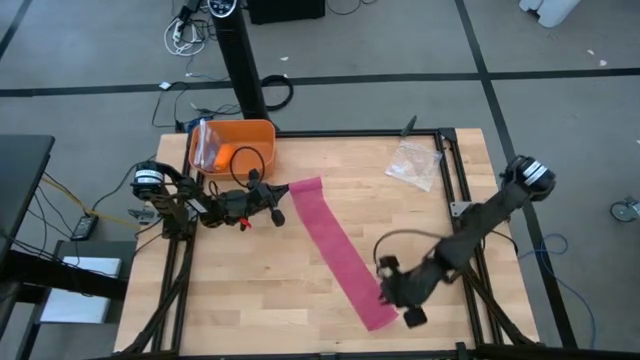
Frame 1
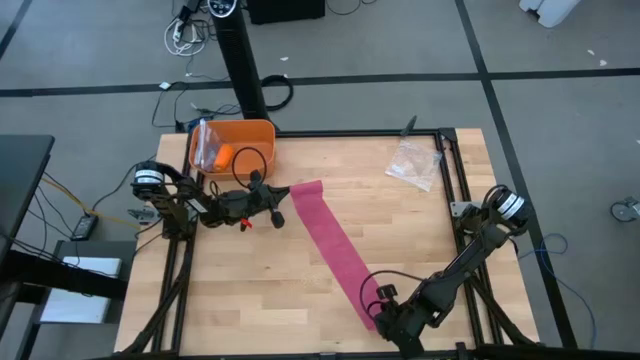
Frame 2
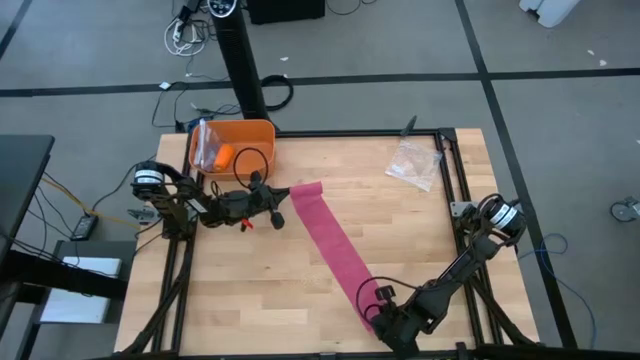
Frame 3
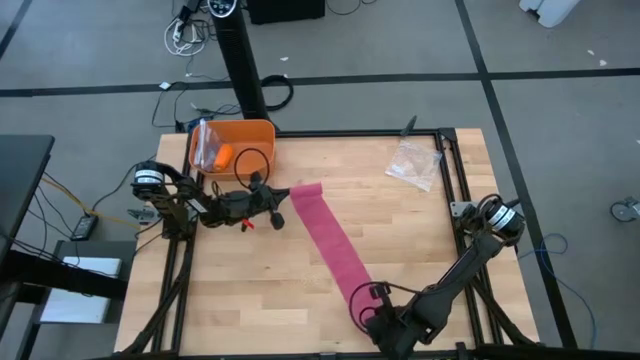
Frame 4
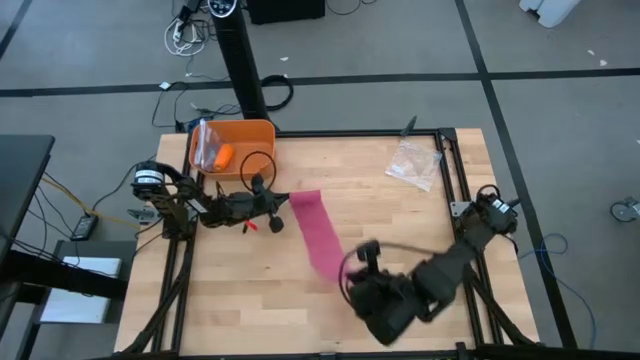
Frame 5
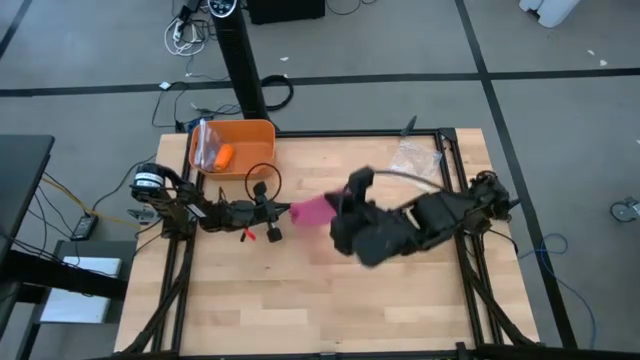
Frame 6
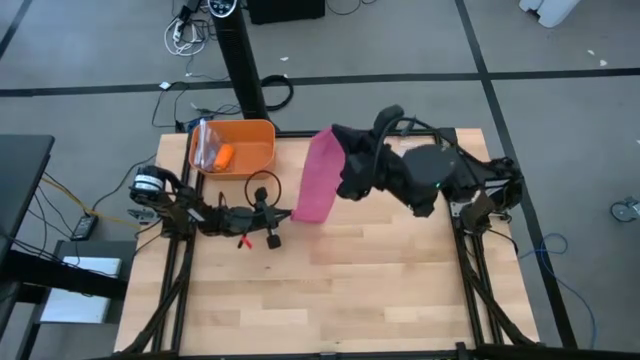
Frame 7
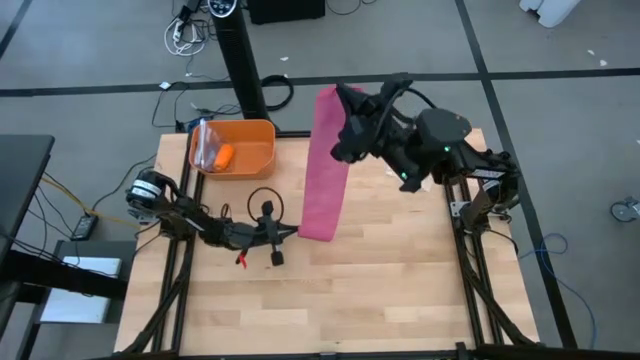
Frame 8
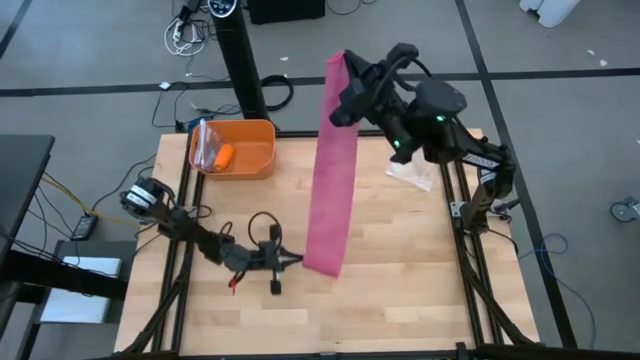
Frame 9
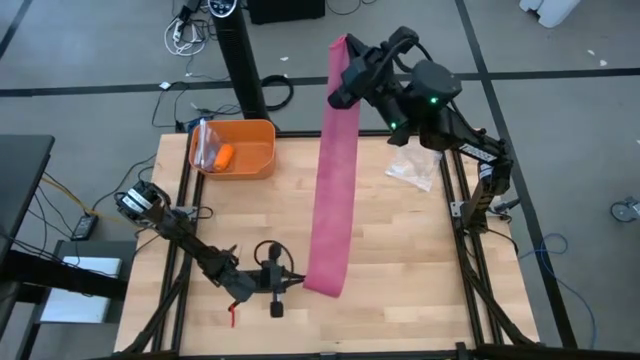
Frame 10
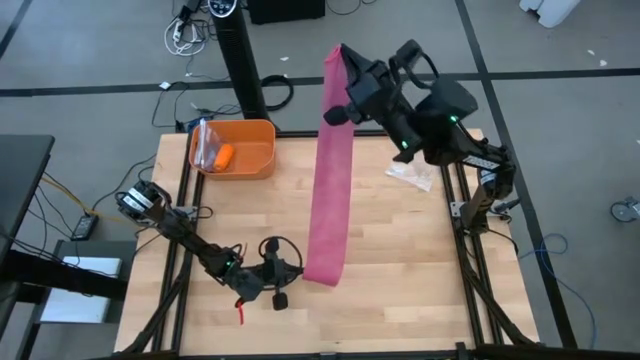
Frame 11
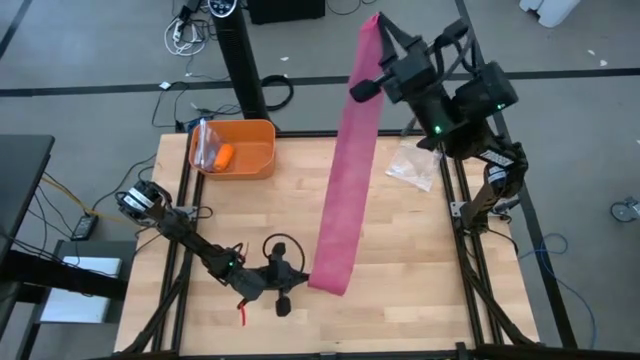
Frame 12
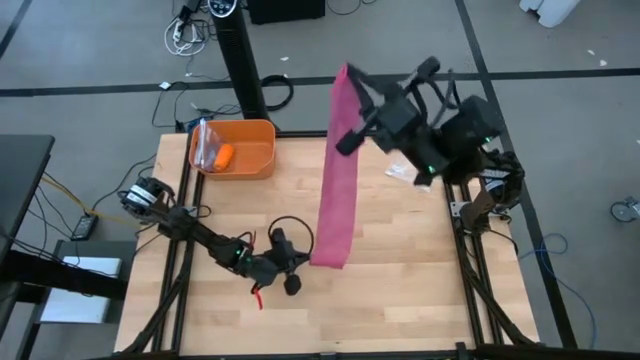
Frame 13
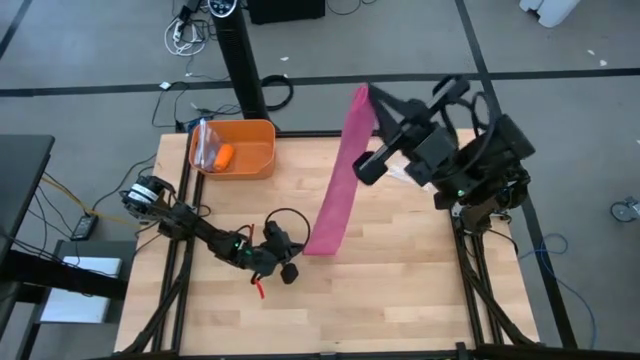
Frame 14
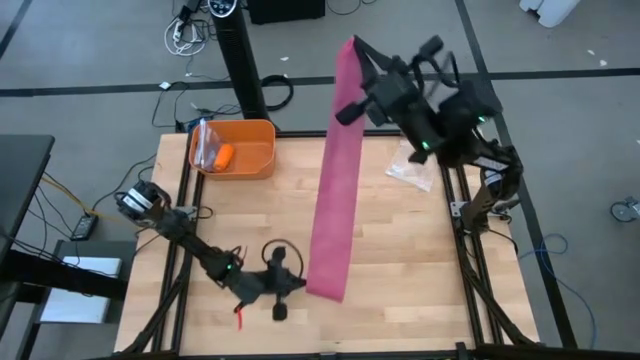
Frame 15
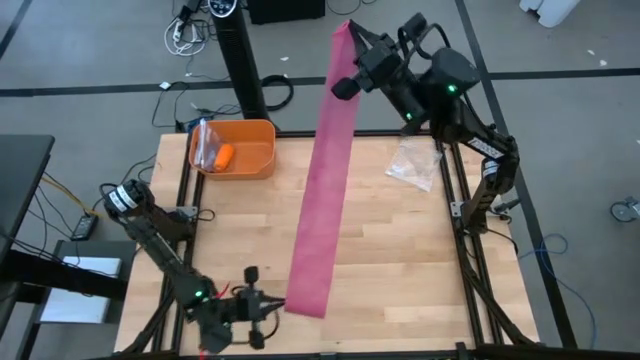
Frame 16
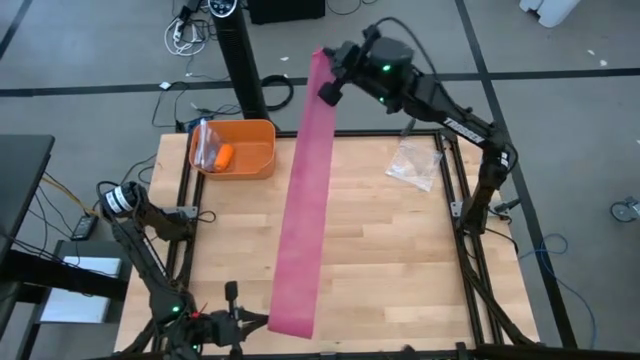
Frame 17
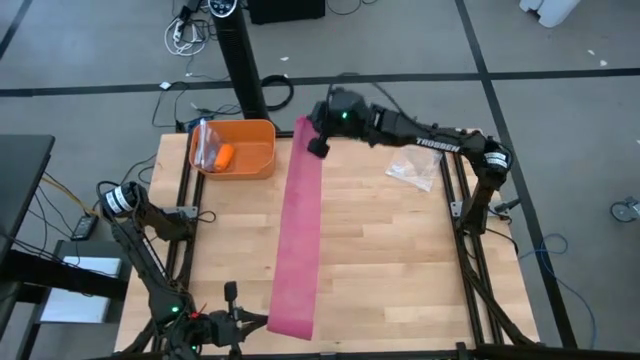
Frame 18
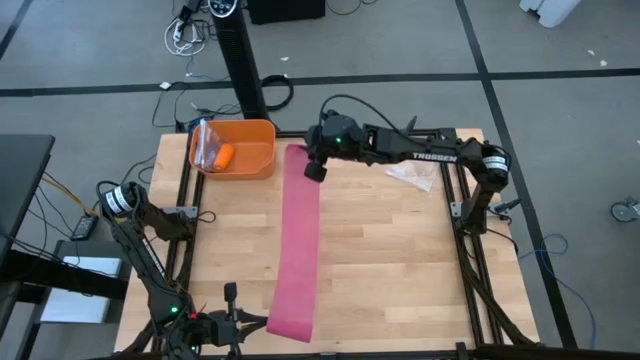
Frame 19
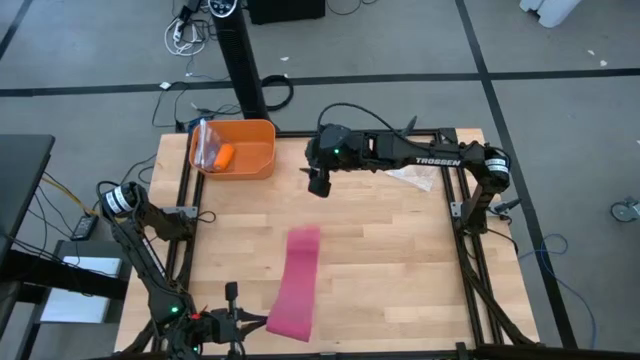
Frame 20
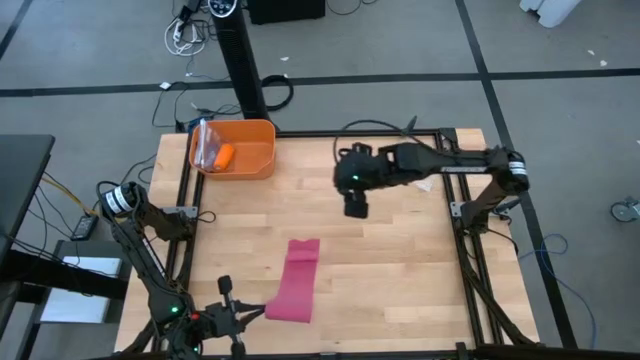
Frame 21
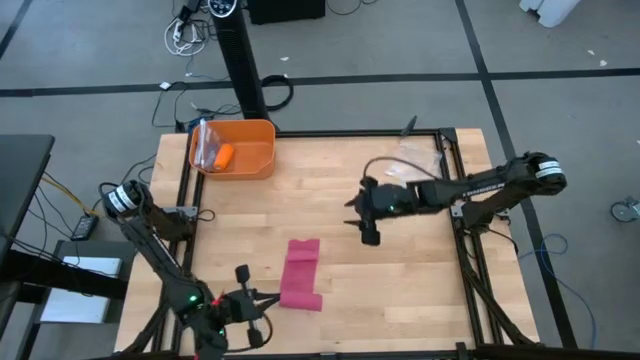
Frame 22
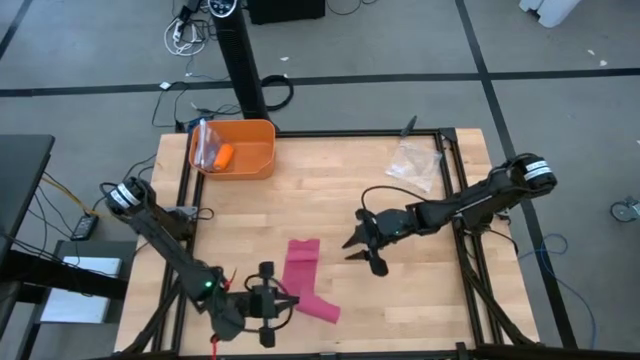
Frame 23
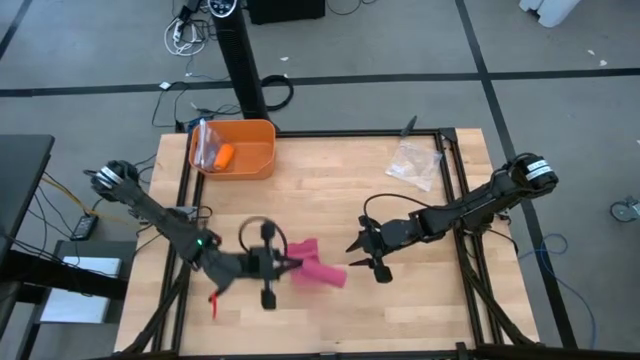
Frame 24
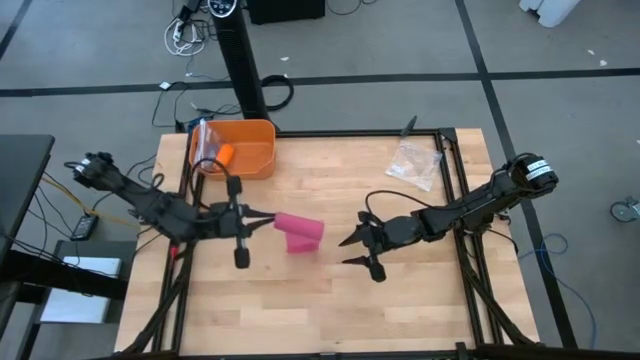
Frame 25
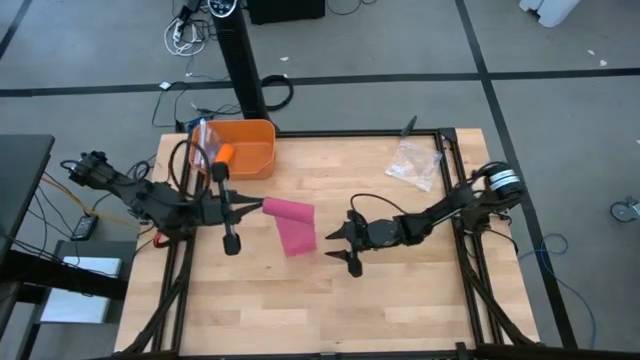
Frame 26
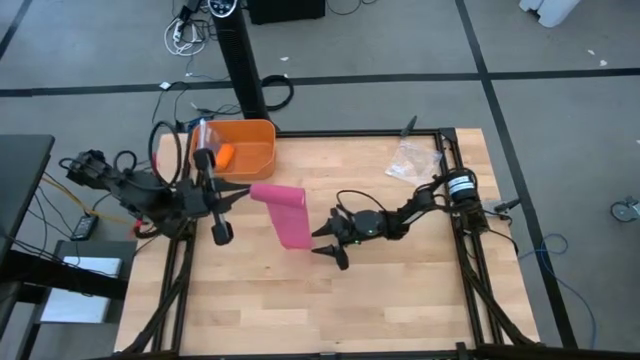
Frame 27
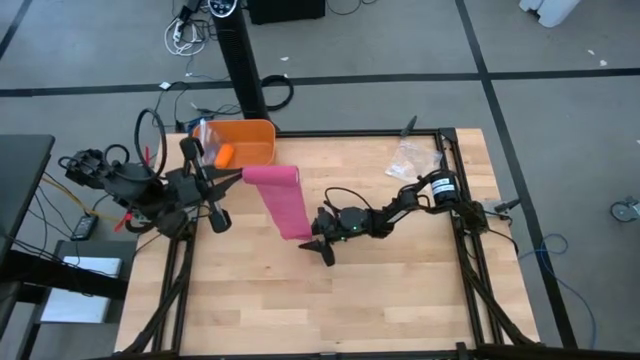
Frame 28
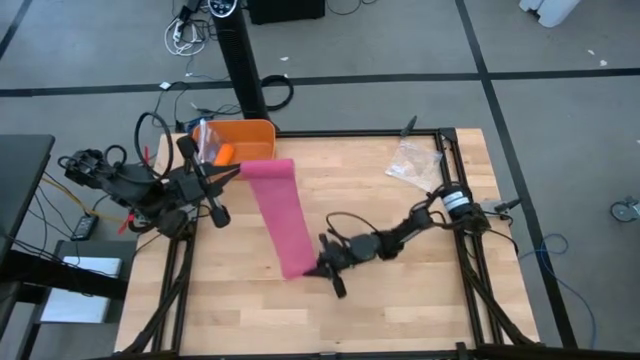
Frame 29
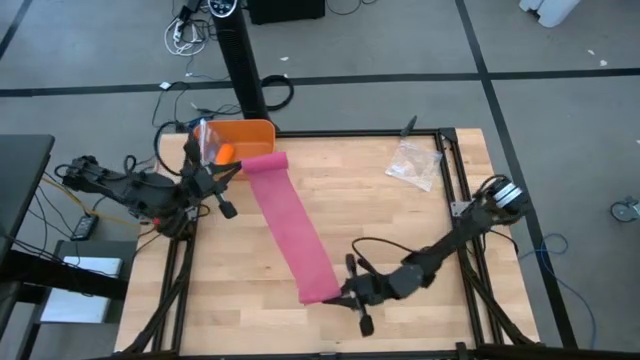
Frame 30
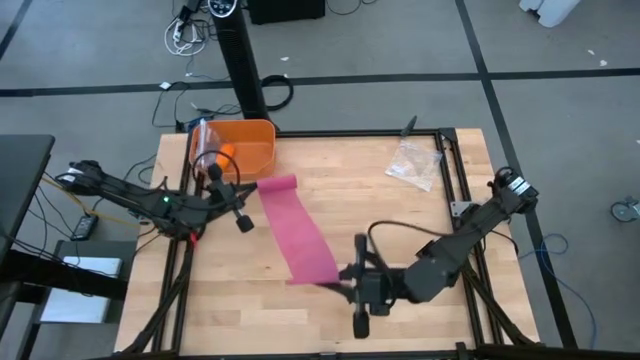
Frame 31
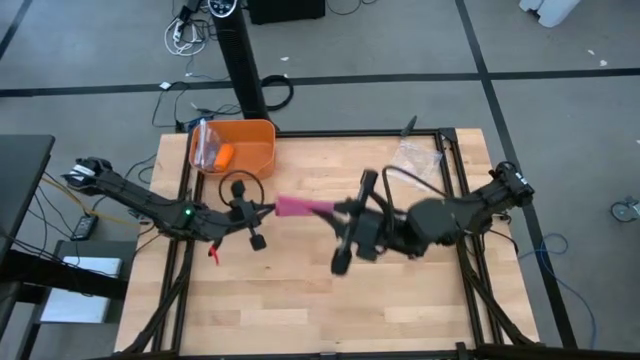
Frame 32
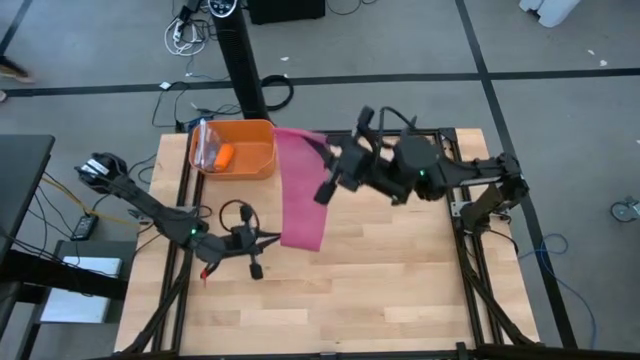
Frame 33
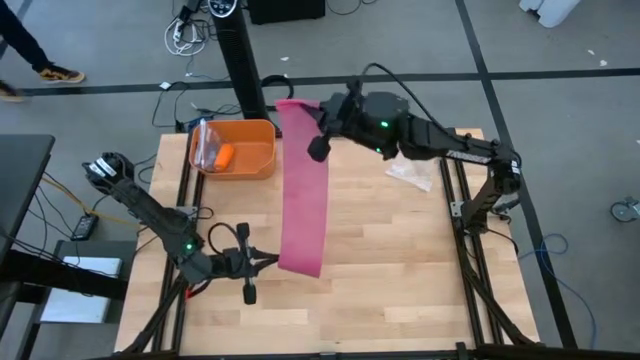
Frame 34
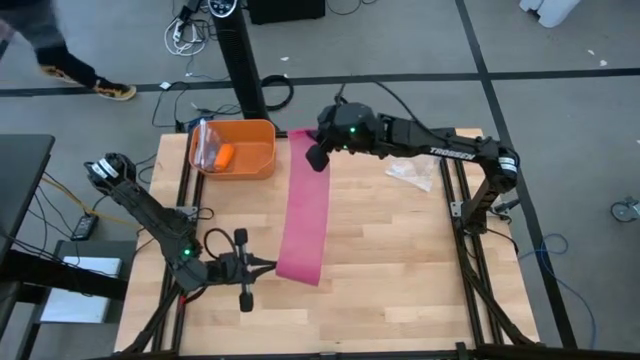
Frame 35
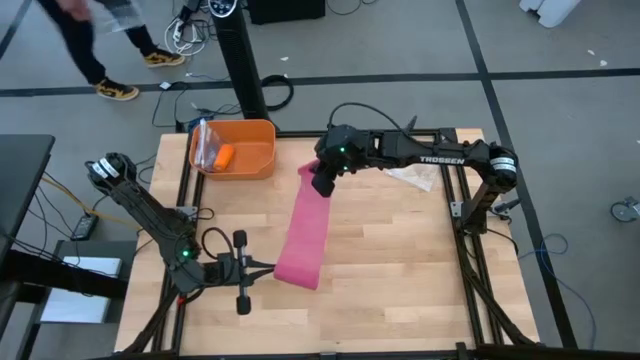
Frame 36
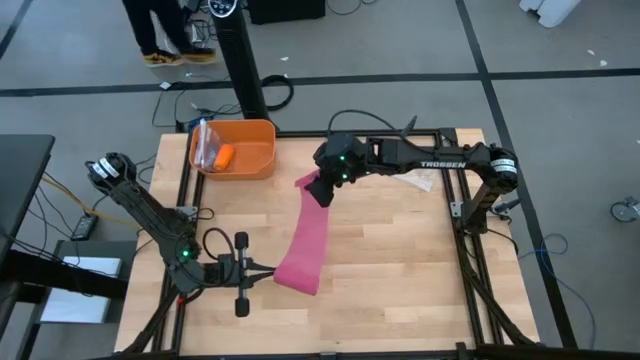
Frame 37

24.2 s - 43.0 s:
Task: Roll bandage
Roll the pink bandage
